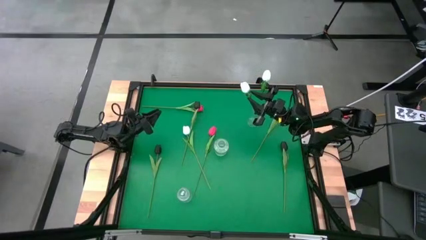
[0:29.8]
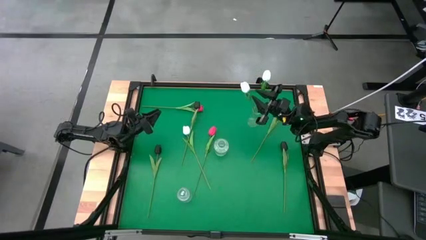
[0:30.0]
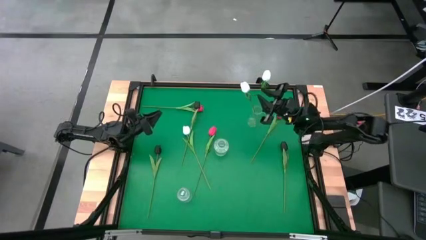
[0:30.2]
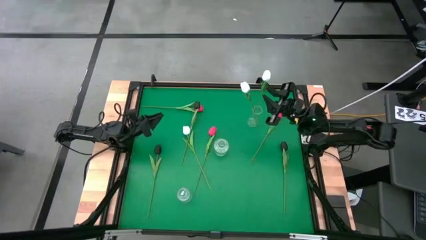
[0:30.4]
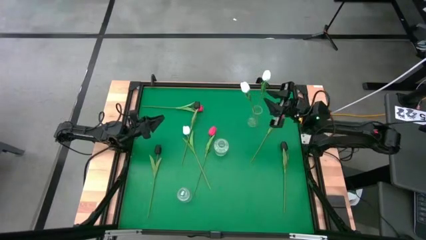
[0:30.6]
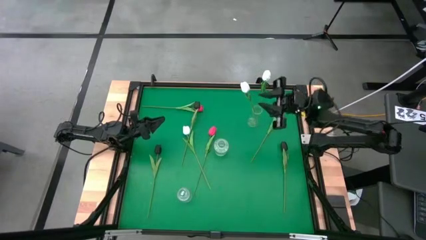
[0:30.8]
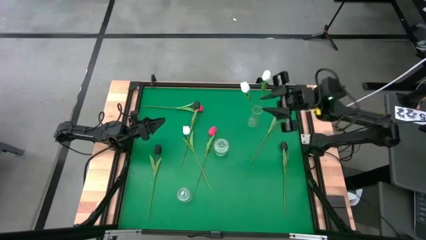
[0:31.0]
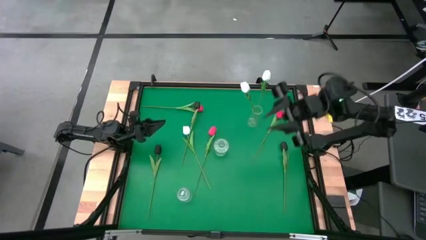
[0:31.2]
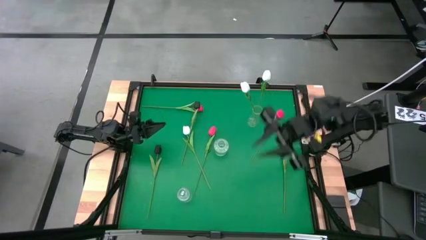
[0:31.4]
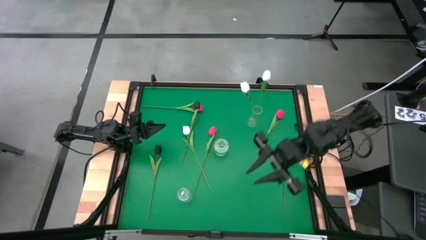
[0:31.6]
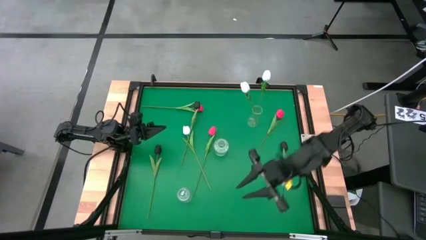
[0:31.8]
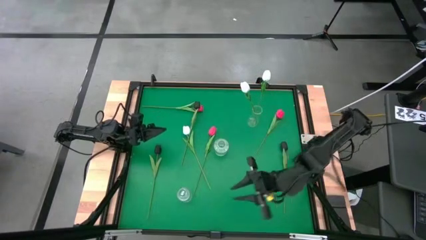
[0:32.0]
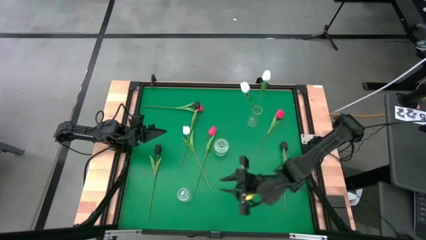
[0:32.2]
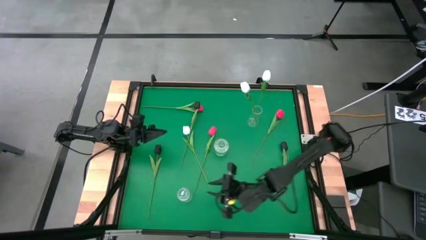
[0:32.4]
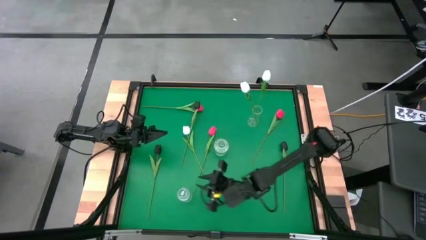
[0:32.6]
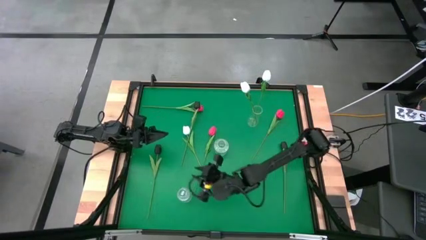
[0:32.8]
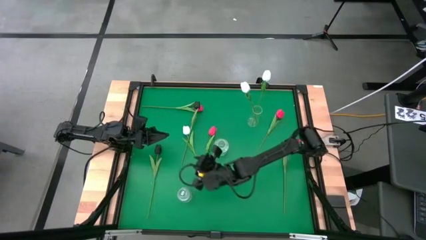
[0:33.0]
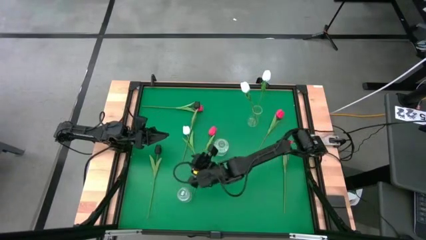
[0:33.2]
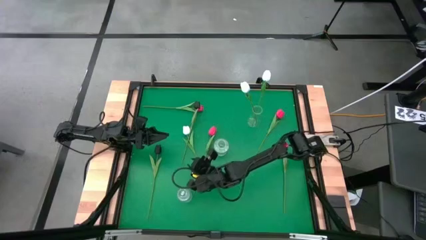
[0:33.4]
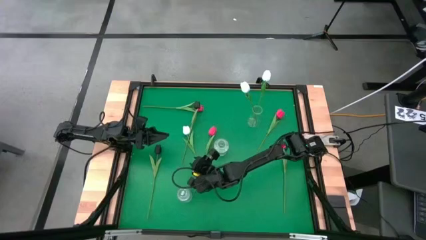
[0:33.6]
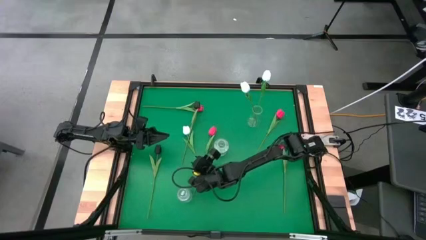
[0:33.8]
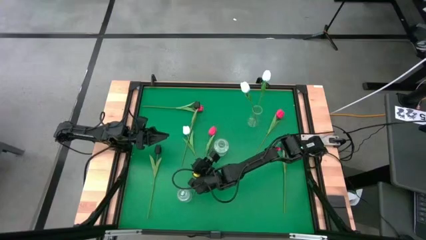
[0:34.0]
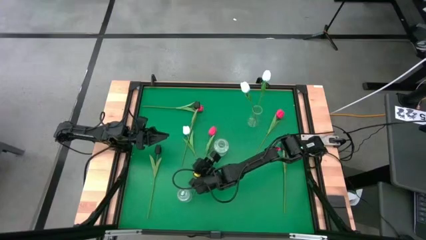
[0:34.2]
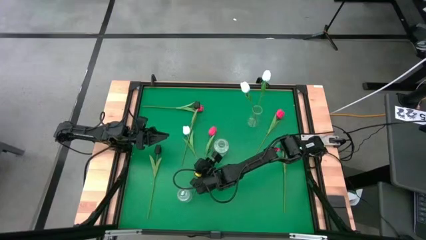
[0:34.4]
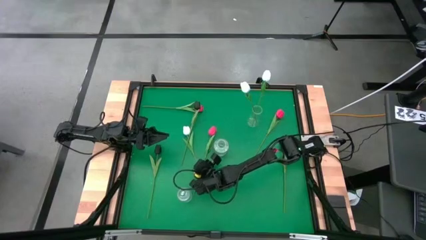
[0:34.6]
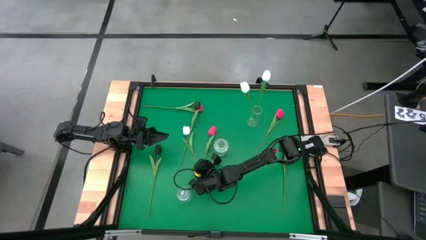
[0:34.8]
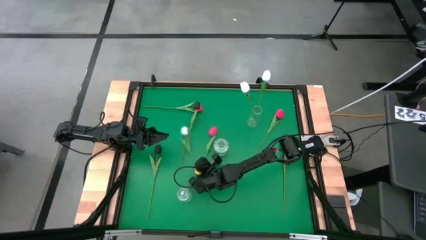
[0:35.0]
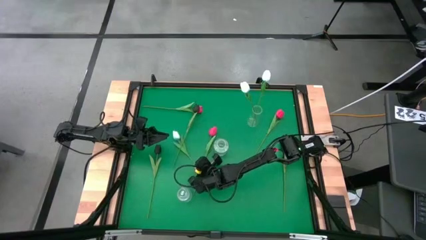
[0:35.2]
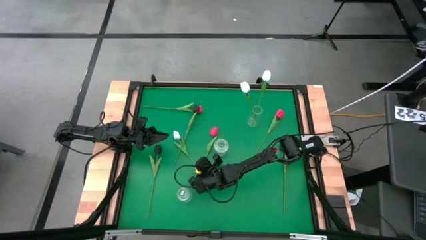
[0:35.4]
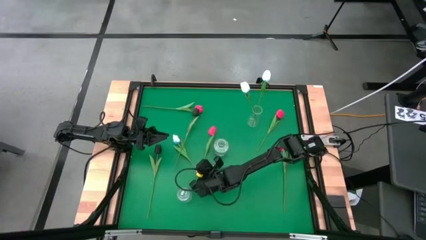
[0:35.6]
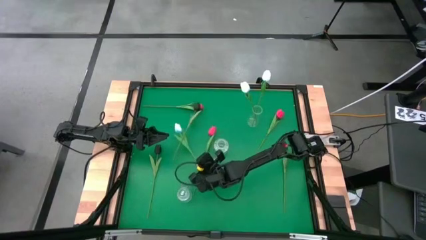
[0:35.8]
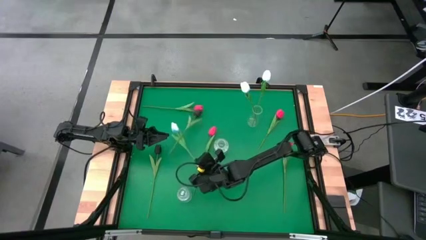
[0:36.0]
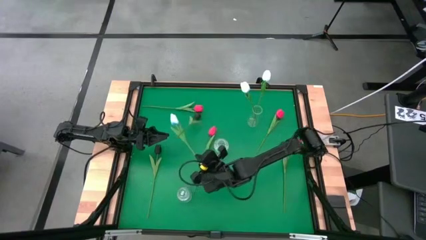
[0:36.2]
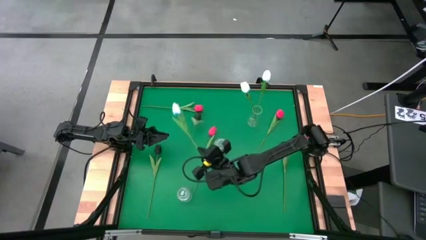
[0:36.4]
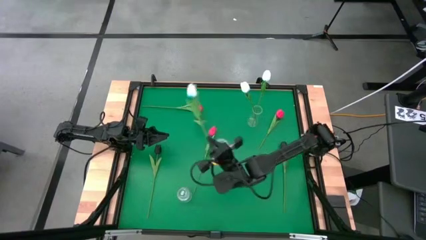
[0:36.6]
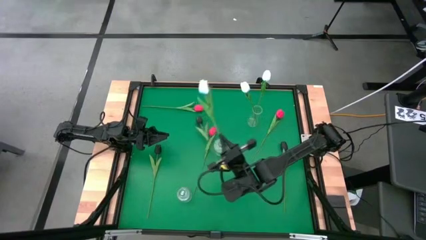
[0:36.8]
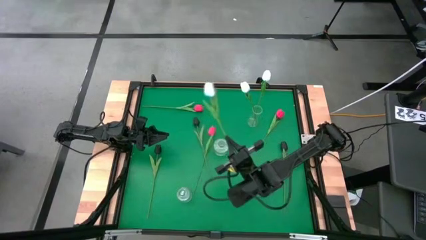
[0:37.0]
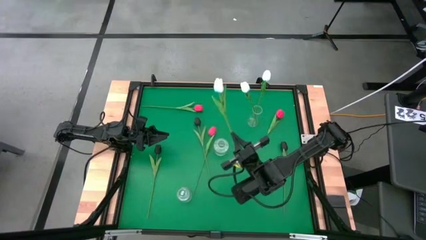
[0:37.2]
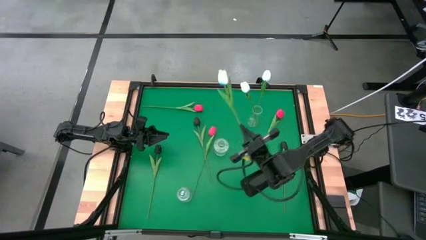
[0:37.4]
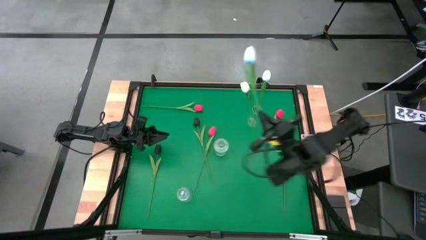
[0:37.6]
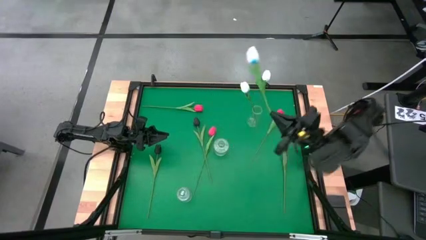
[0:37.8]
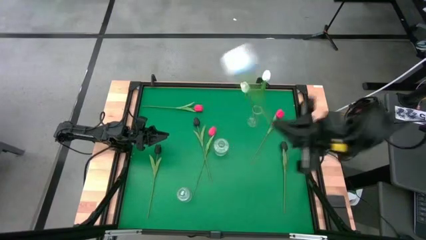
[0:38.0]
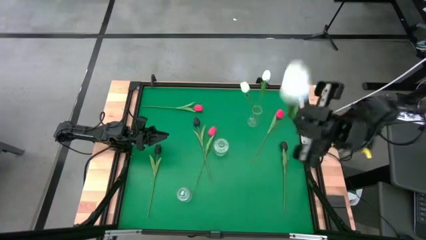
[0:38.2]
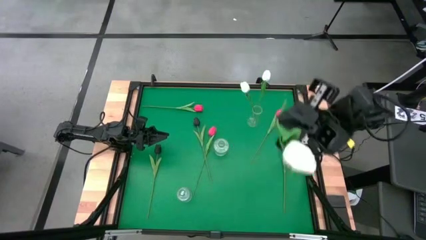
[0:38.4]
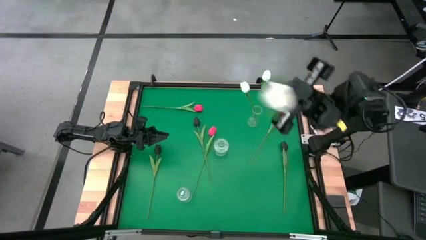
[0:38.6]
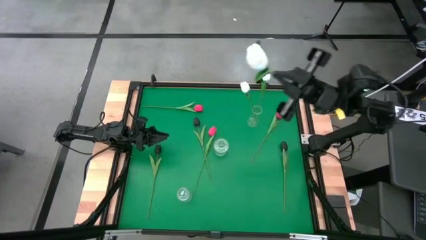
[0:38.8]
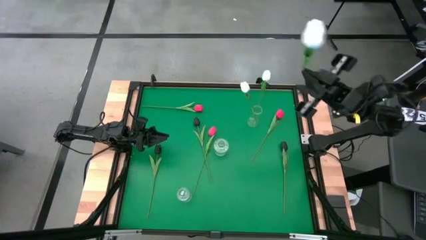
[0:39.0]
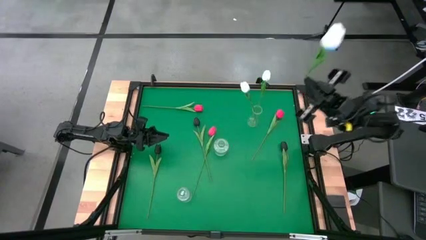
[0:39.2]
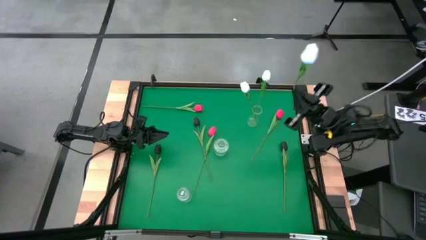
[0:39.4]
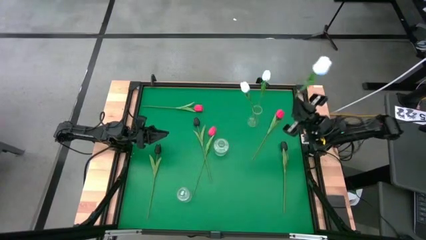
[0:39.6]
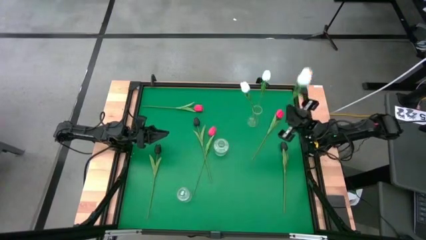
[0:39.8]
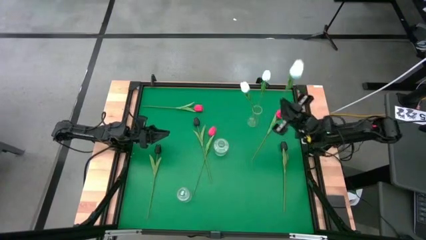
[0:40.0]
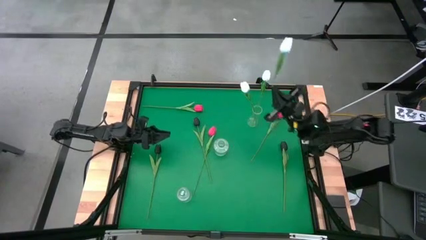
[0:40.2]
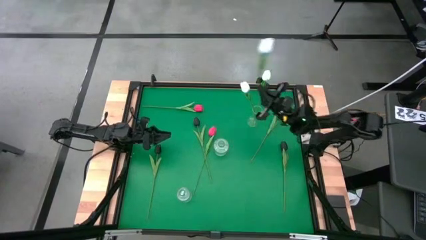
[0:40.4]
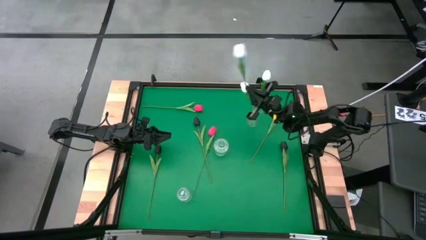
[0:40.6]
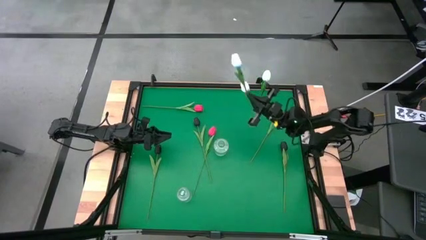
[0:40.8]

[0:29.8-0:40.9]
Task: Sort flowers into vase by color
Put the white tulip into the top transparent flower vase

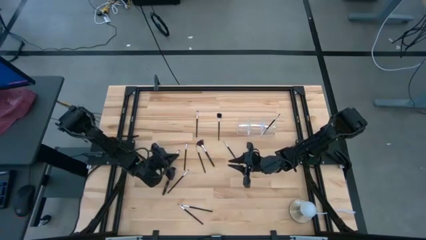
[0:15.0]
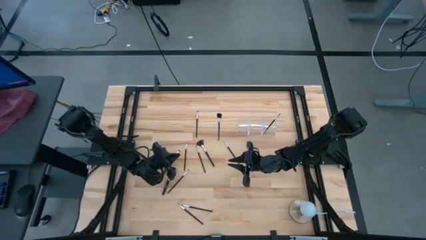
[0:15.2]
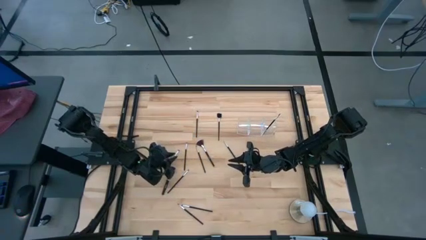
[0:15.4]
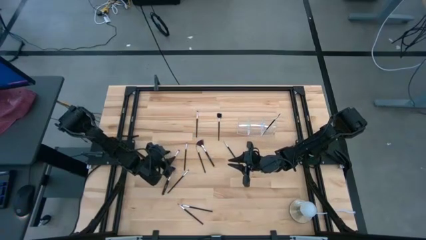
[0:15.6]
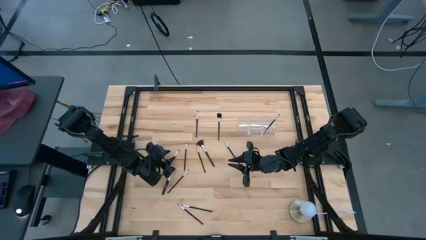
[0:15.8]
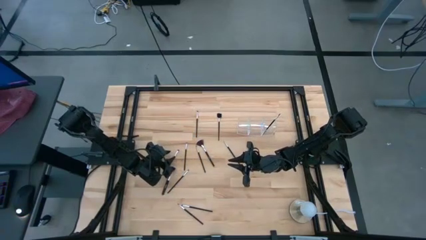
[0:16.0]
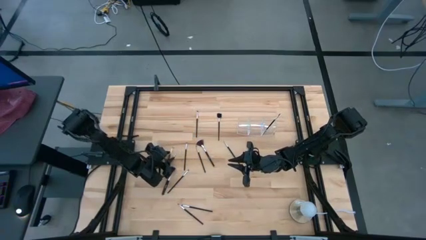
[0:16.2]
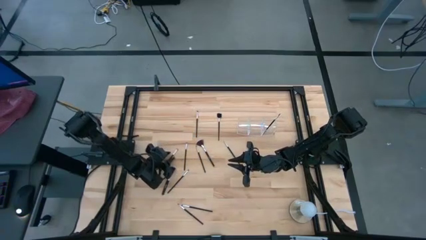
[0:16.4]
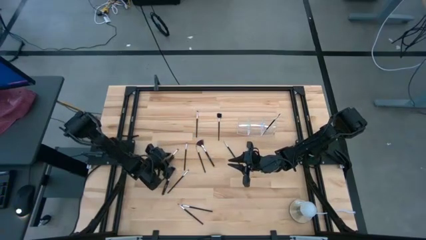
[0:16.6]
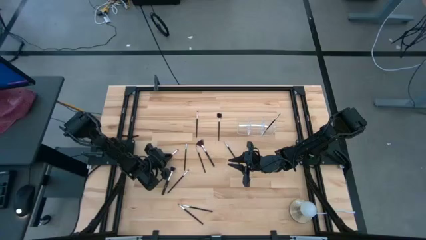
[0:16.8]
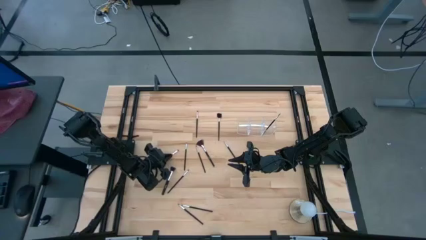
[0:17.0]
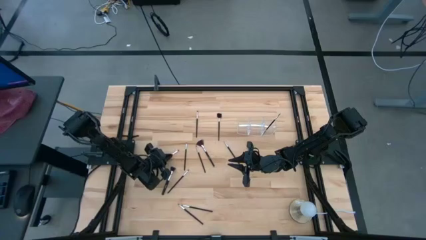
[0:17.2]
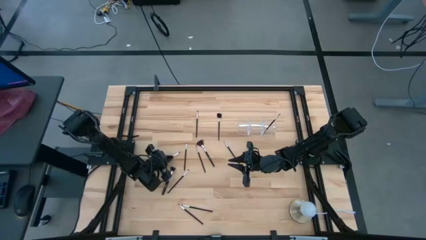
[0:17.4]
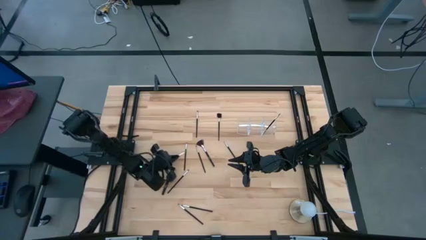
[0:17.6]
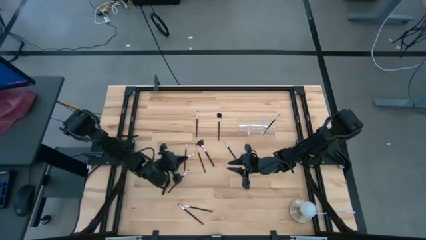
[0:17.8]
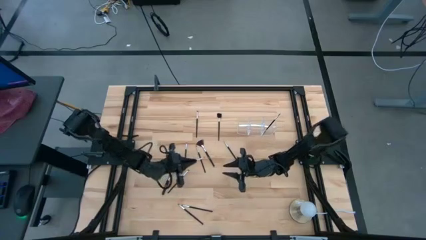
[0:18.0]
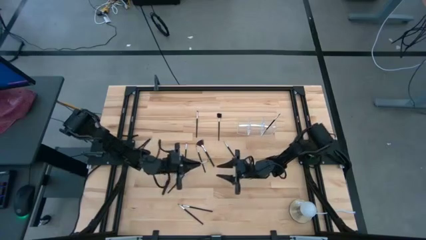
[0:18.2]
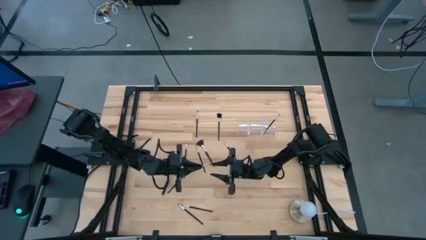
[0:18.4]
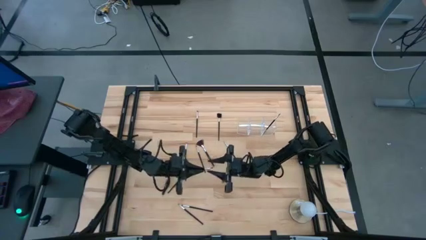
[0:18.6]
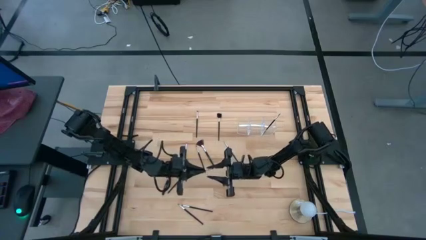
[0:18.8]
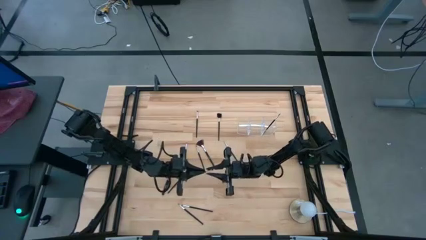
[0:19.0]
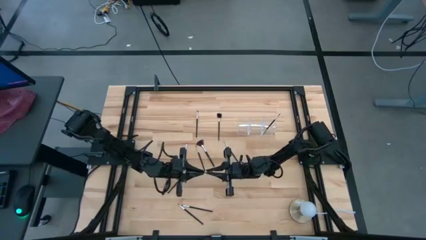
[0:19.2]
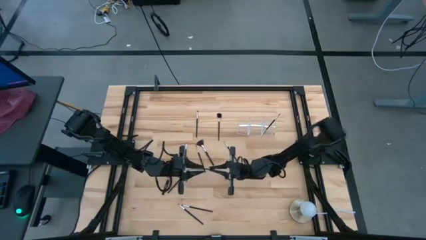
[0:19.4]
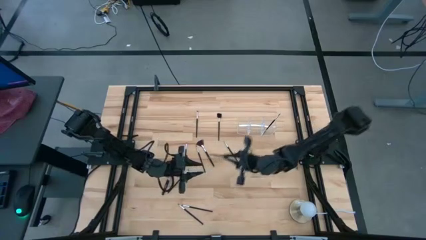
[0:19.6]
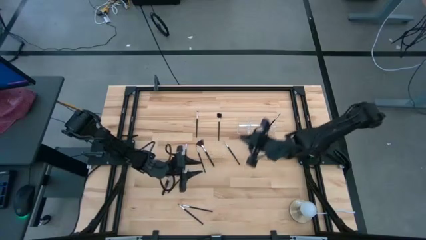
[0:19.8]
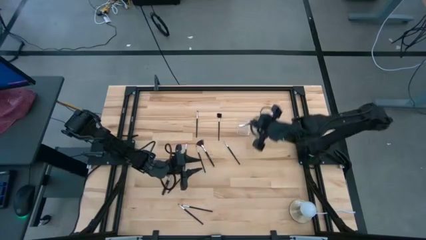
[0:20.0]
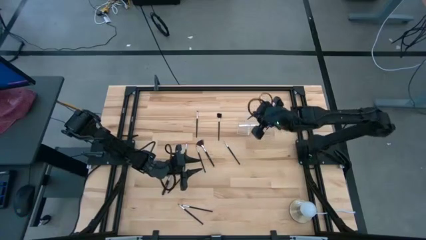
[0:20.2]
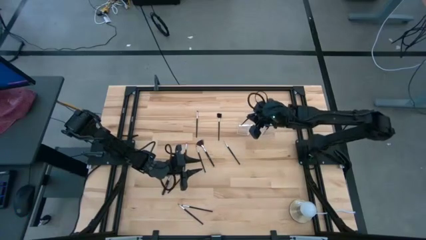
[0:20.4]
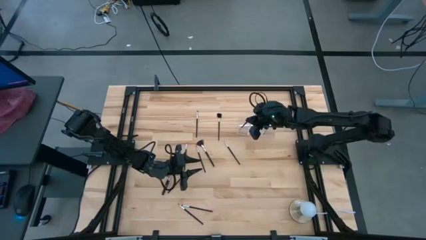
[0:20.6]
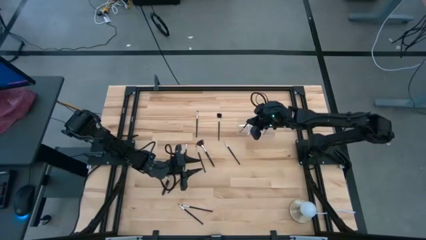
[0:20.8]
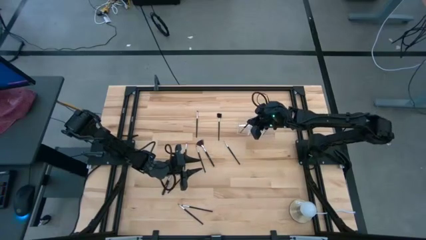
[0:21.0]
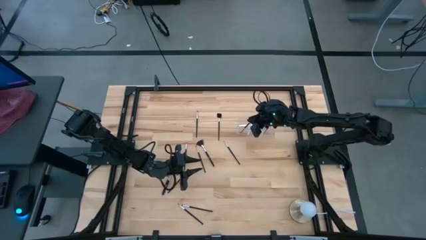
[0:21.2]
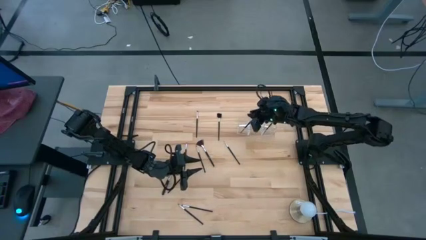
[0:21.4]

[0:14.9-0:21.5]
Task: Put items in baskets/containers
Put the black eyeshadow brush into the transparent organizer
